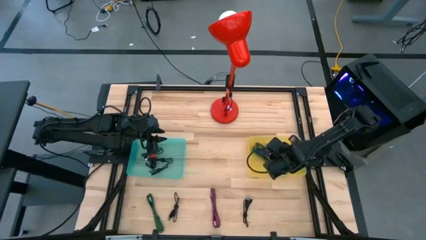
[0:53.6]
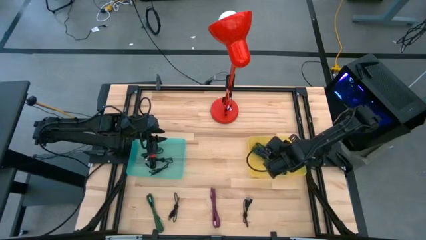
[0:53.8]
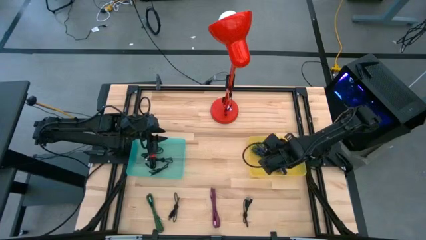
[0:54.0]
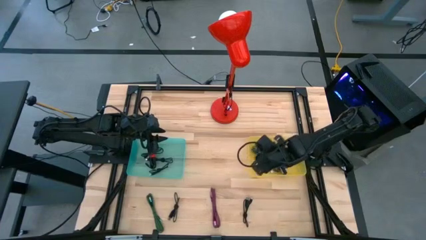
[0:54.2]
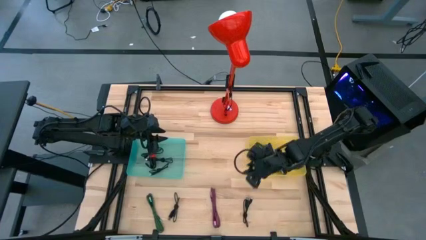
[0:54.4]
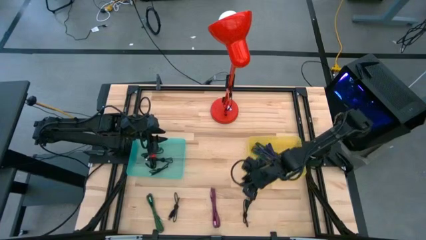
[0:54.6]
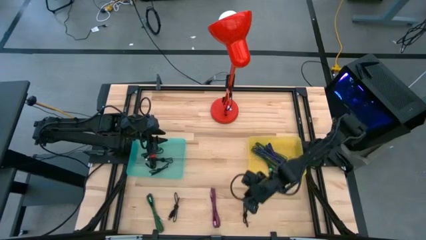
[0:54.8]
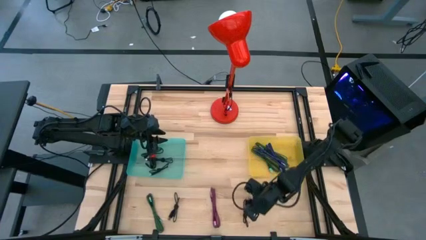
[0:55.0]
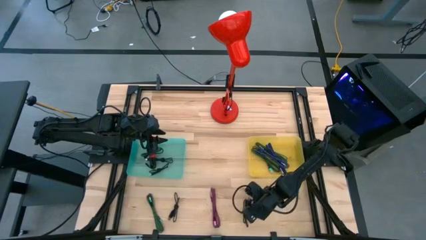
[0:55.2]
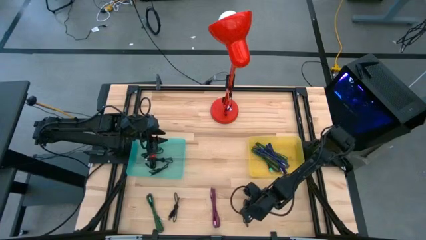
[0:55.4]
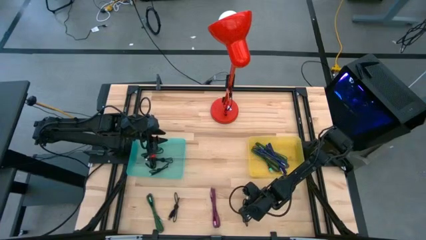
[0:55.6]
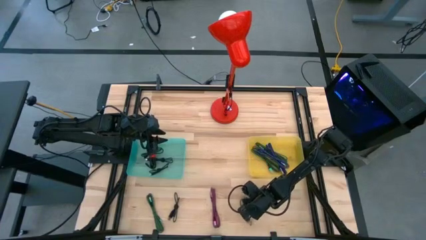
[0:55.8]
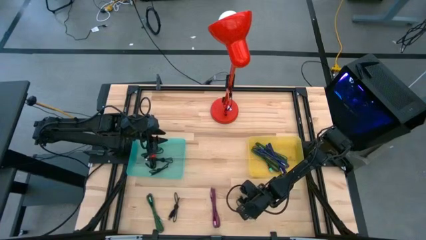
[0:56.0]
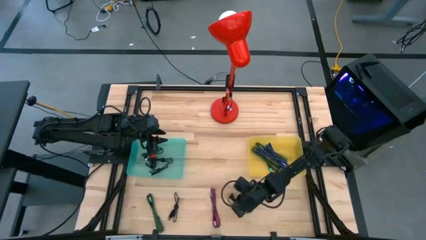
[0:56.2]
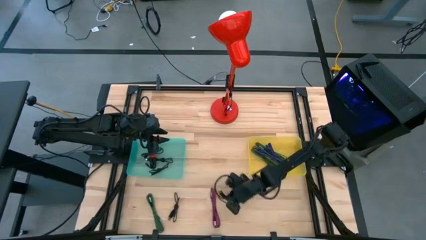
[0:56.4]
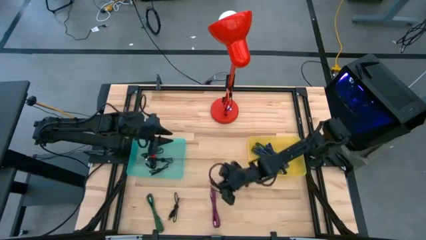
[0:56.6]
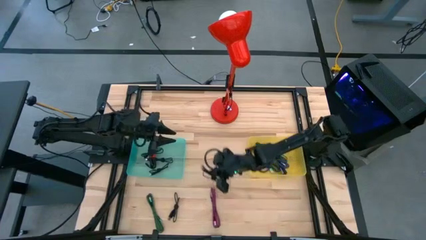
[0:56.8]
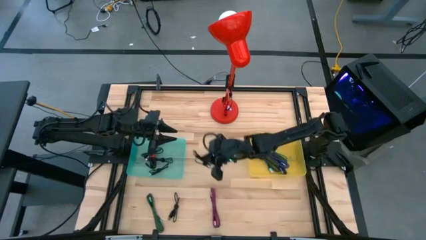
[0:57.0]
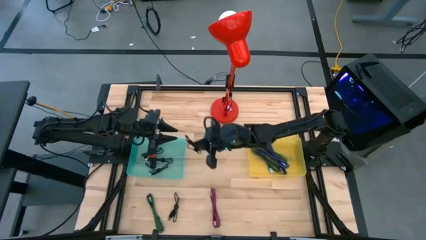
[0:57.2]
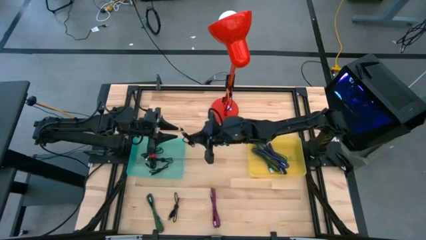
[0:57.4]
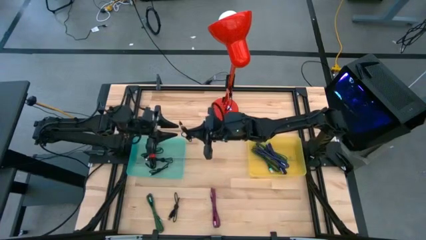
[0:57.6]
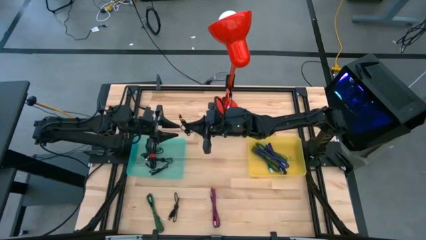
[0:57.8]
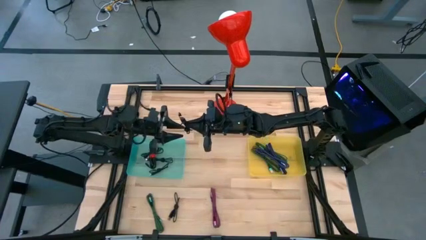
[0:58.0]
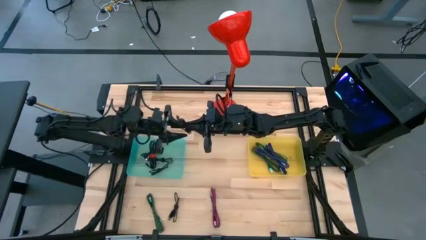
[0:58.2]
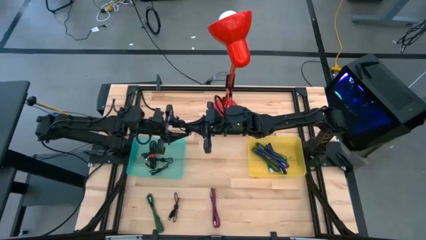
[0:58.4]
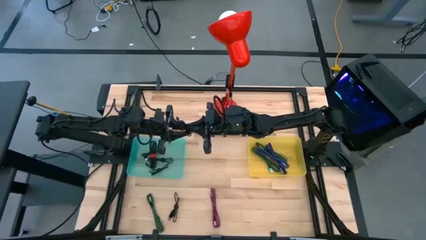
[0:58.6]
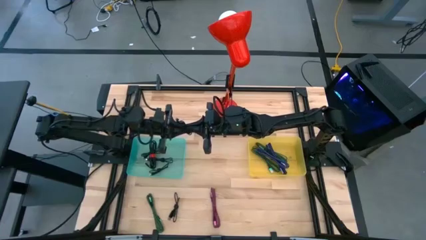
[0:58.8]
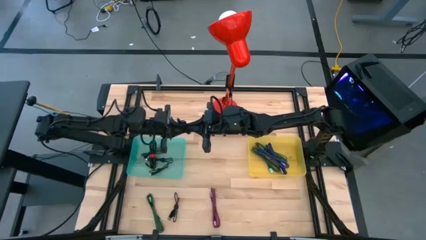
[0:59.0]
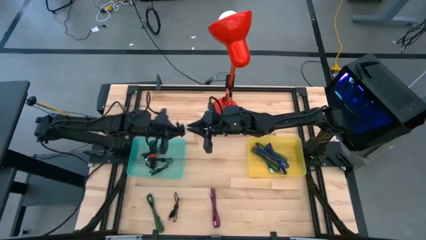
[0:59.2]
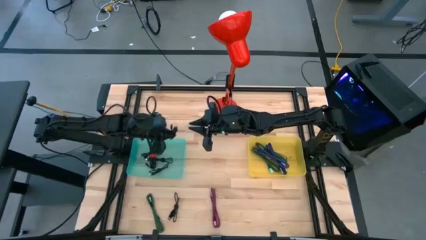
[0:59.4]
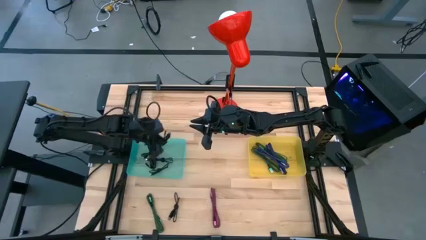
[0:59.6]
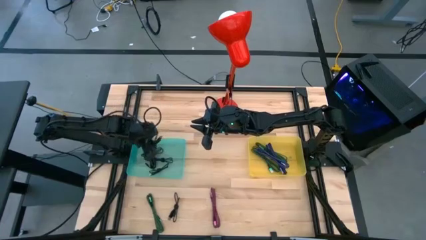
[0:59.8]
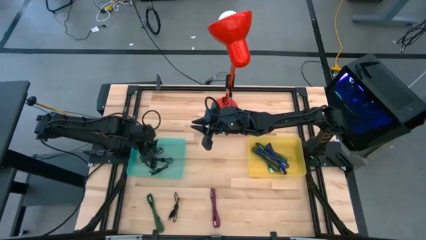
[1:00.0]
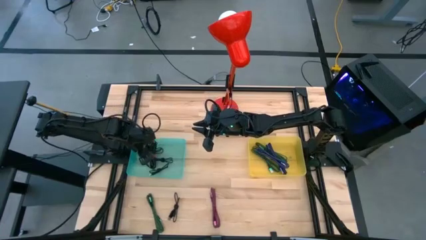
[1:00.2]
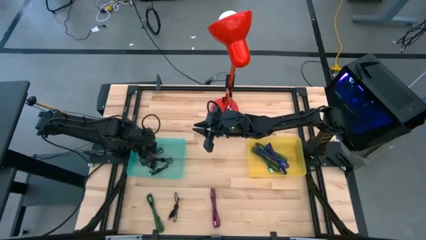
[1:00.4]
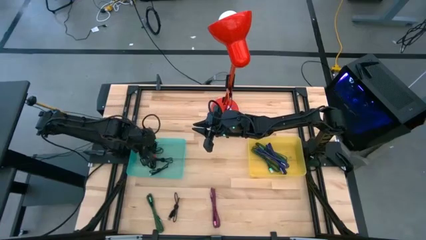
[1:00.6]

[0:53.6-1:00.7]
Task: Pick & Place USB Port
Put the black charger cable into the green bin

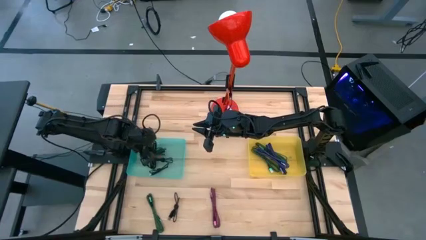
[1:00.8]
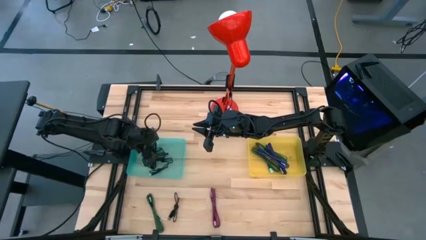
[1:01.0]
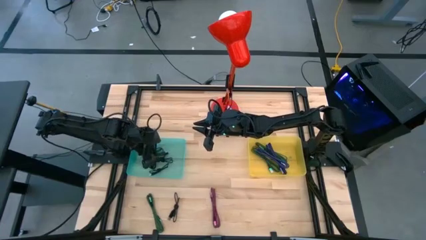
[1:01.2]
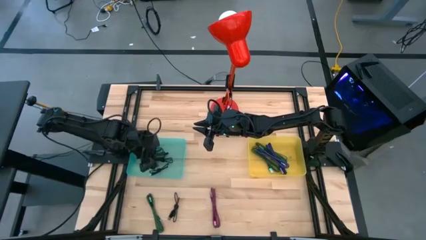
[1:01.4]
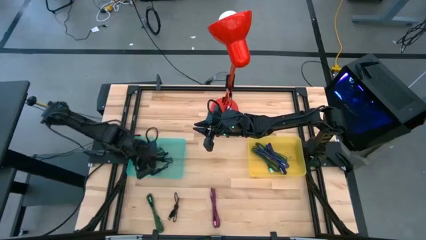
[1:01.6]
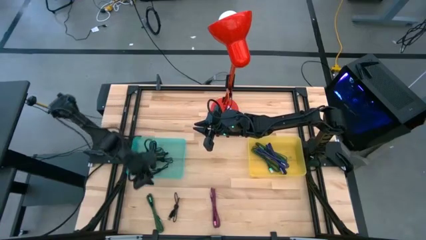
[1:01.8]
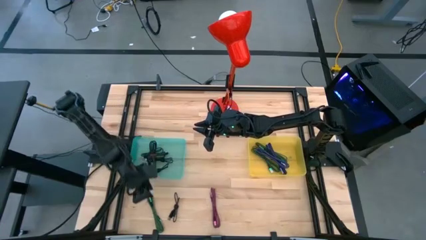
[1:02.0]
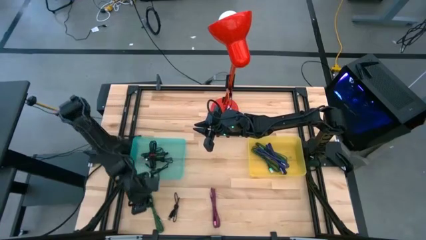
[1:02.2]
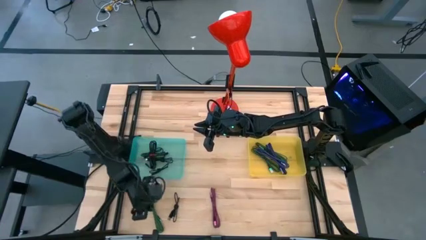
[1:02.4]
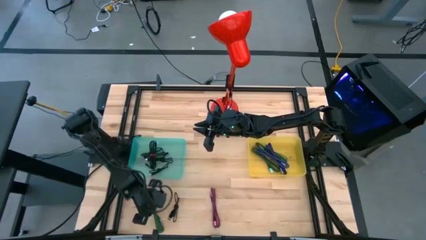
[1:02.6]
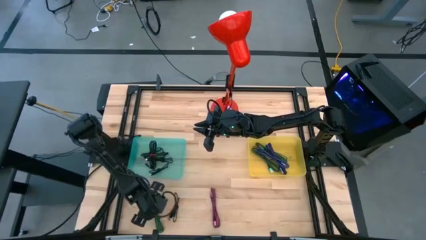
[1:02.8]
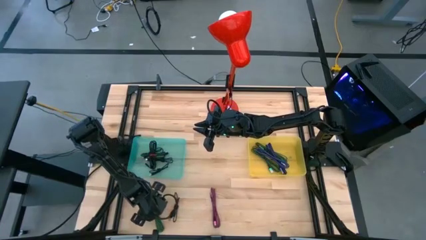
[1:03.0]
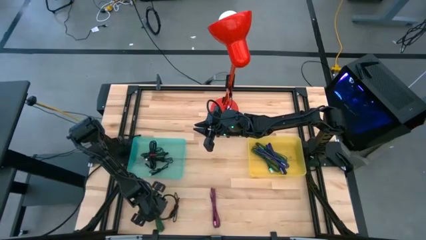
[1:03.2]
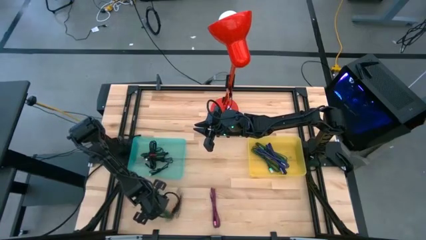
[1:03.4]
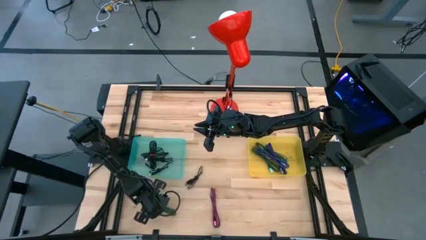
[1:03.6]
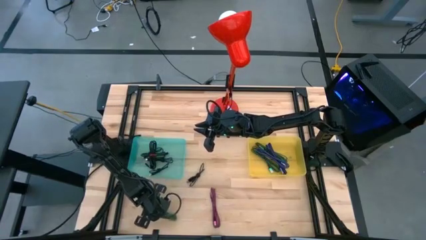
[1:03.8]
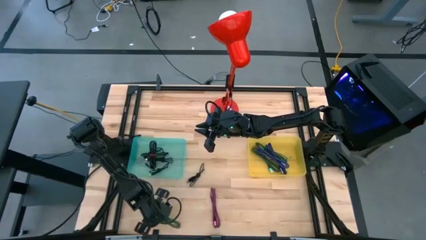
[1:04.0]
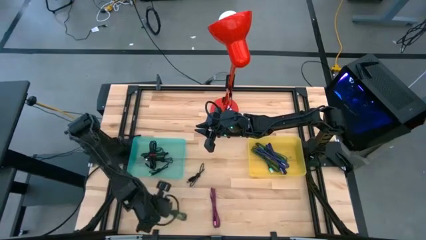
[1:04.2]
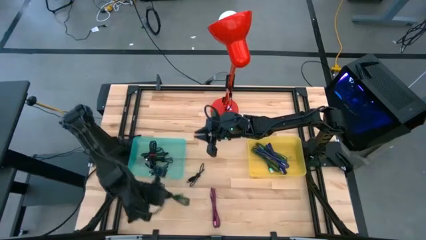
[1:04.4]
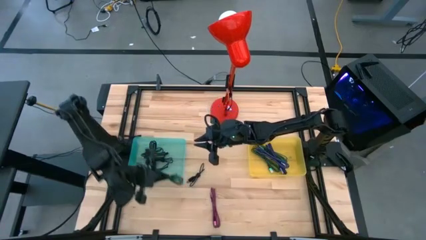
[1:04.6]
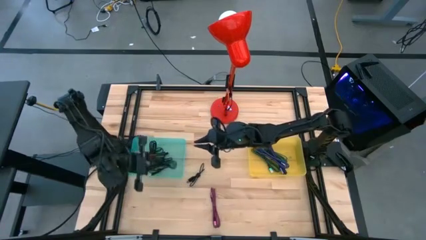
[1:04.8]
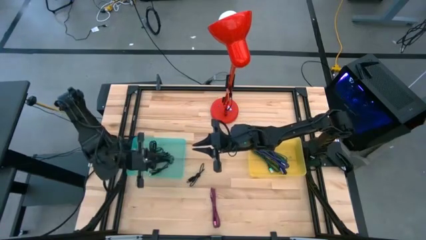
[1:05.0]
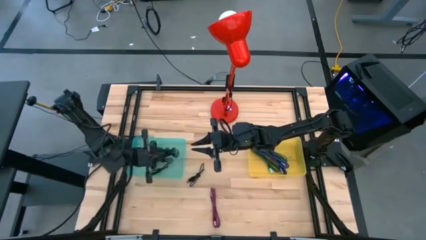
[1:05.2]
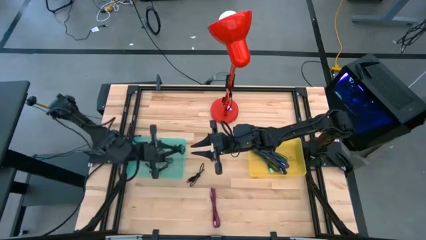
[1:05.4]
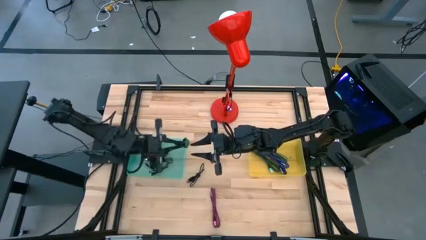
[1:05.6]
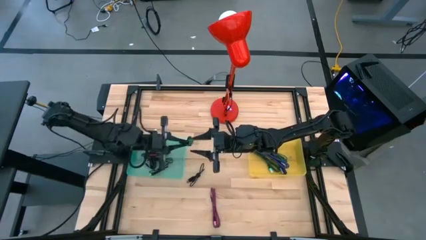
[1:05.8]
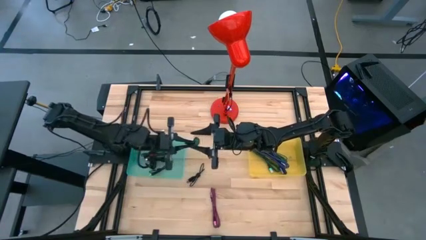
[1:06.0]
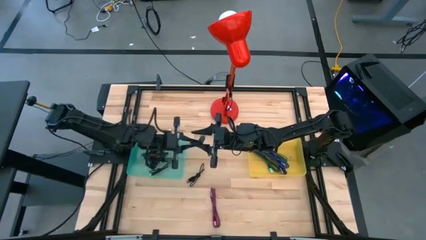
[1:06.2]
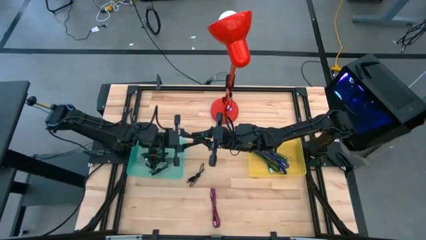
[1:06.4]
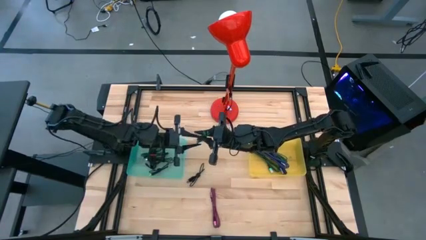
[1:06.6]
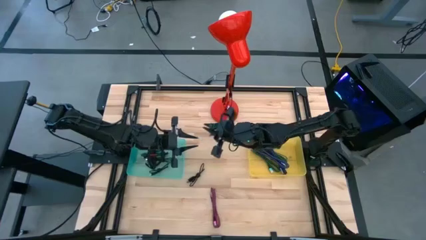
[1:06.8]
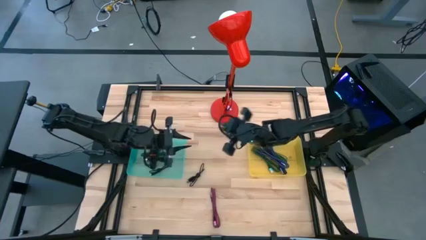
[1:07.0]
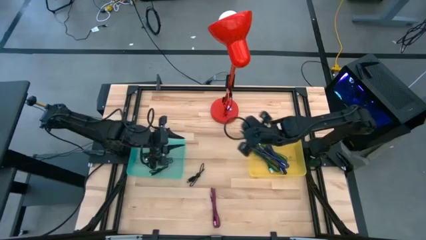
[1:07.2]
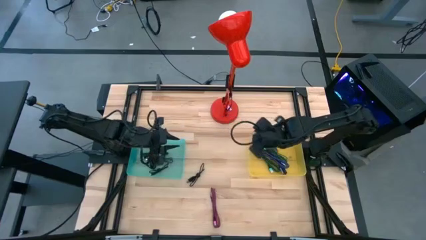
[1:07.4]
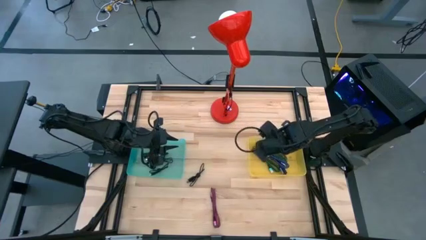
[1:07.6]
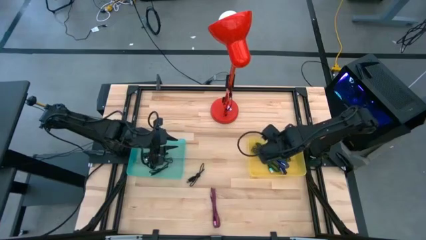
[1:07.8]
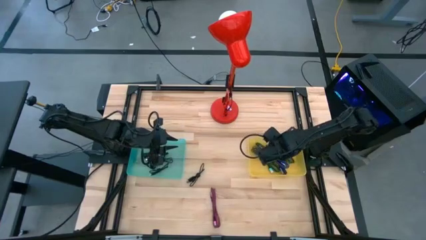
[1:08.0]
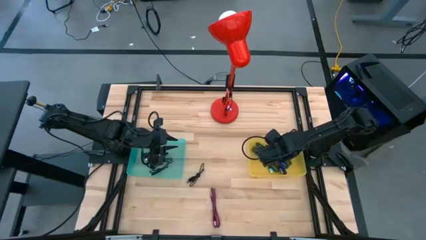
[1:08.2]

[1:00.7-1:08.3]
Put the green charger cable into the yellow bin

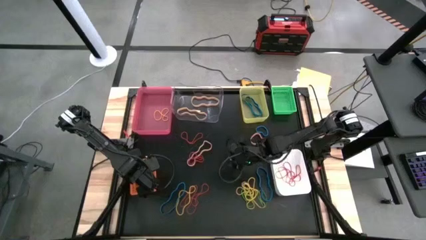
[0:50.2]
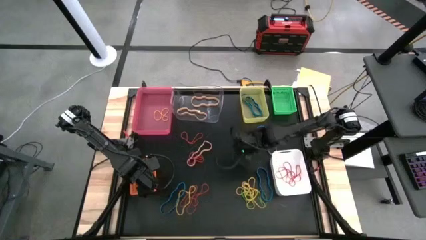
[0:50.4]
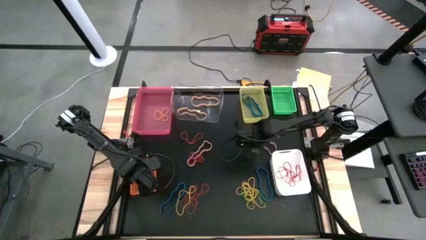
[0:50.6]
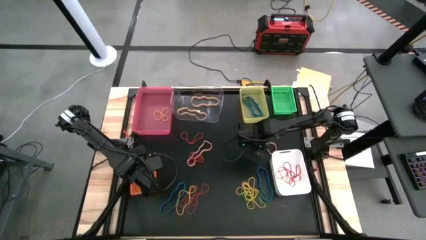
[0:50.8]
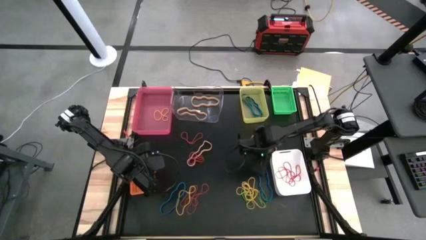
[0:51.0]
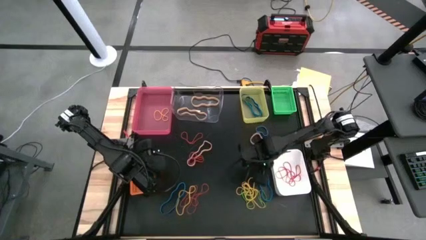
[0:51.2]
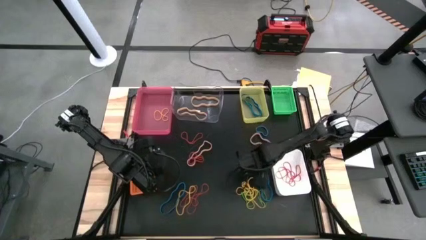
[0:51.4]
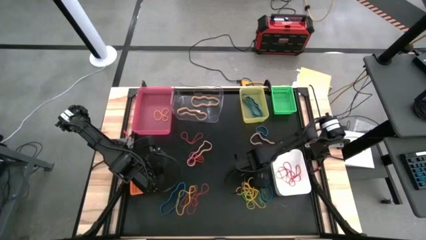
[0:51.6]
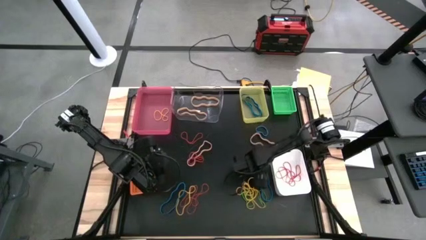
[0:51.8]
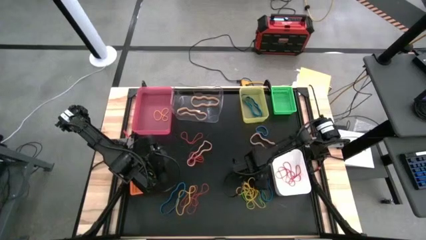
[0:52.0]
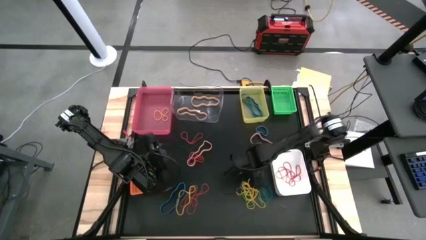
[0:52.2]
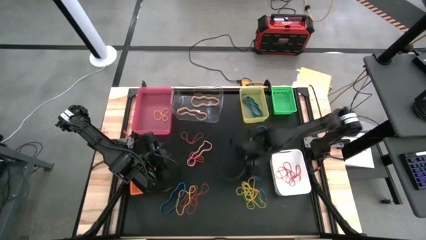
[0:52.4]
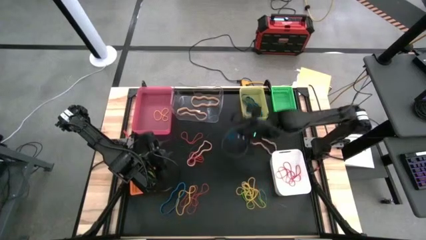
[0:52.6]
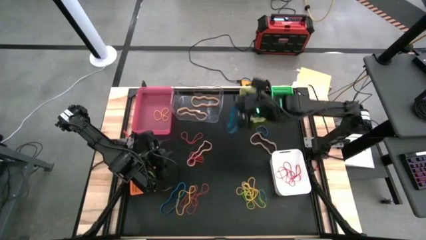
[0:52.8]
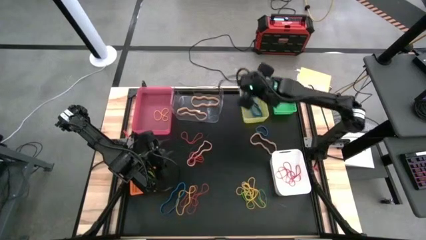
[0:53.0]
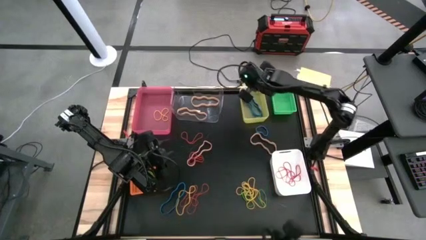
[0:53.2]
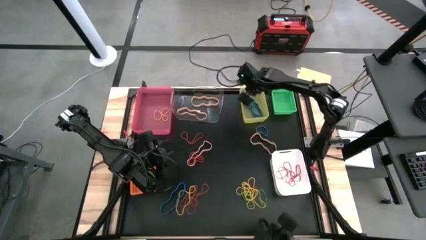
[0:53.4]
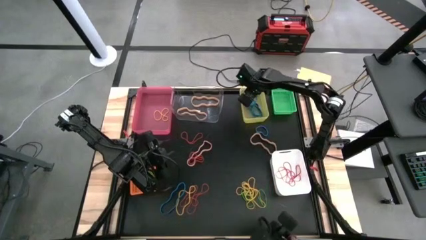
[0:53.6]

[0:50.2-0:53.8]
Task: Sort rubber bands into baskets
Put the blue rubber band into the yellow bin
